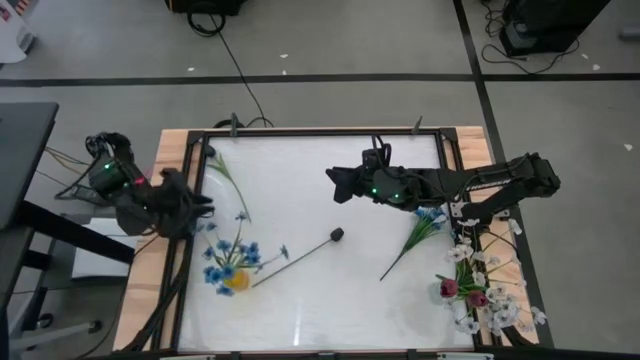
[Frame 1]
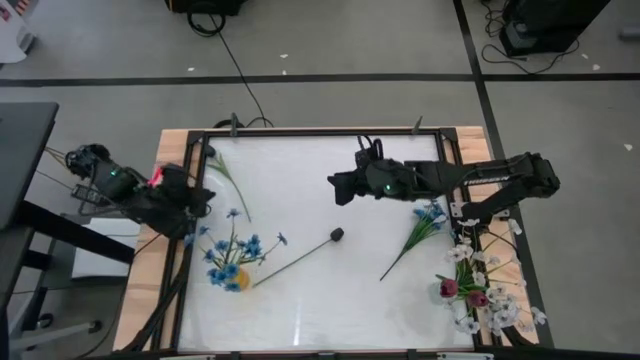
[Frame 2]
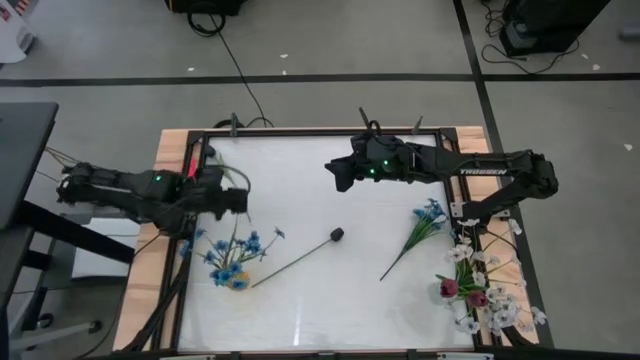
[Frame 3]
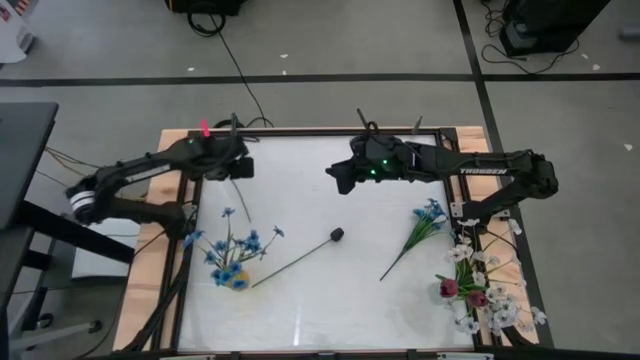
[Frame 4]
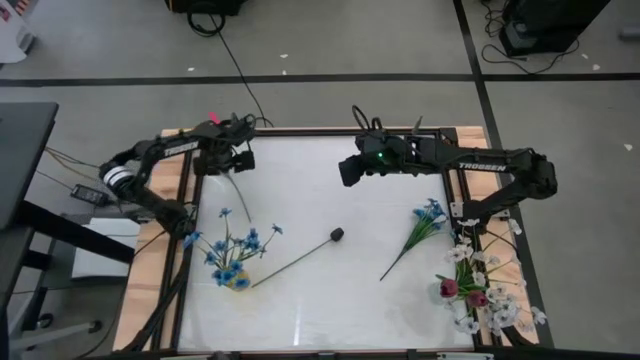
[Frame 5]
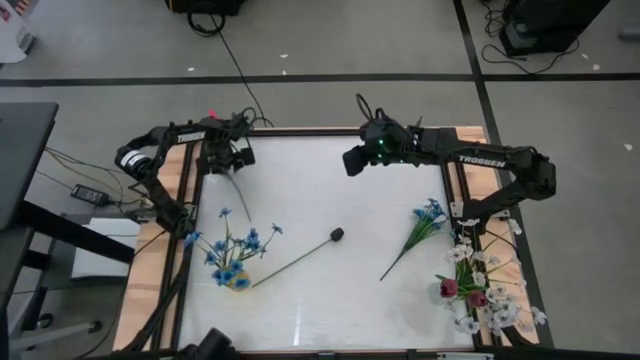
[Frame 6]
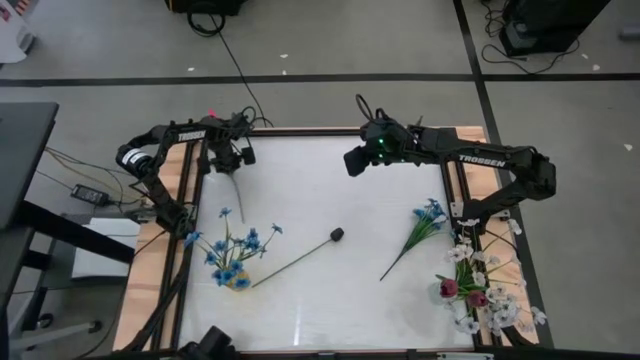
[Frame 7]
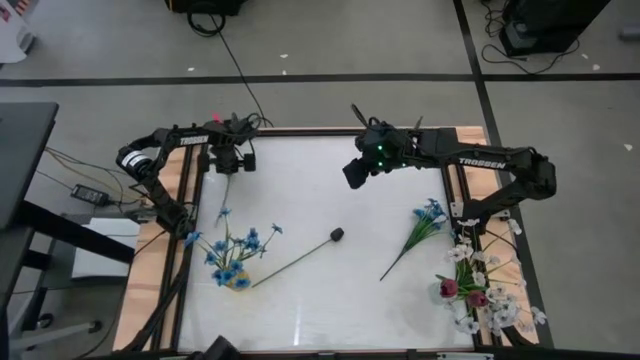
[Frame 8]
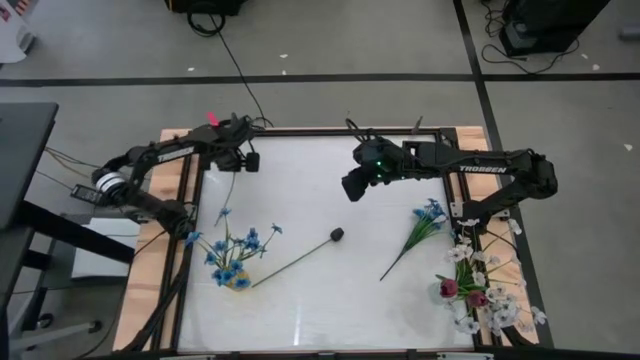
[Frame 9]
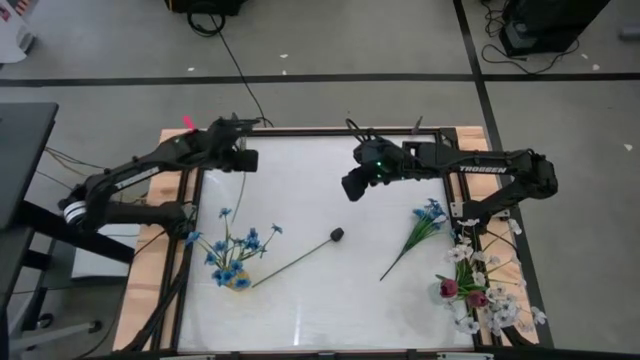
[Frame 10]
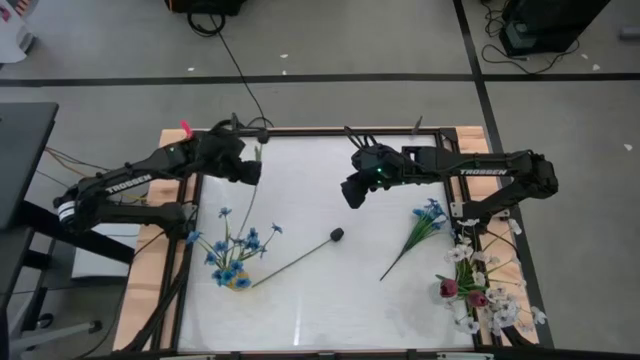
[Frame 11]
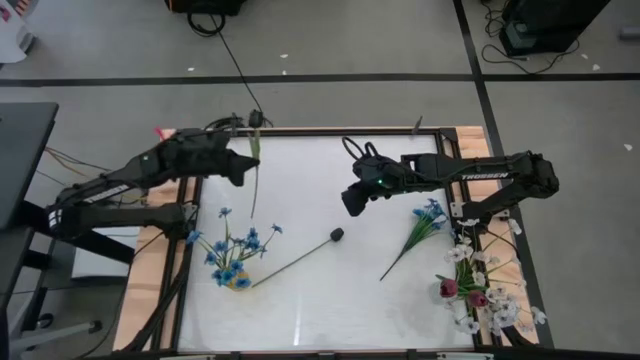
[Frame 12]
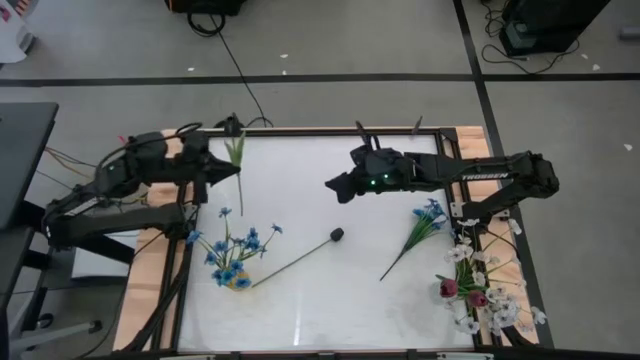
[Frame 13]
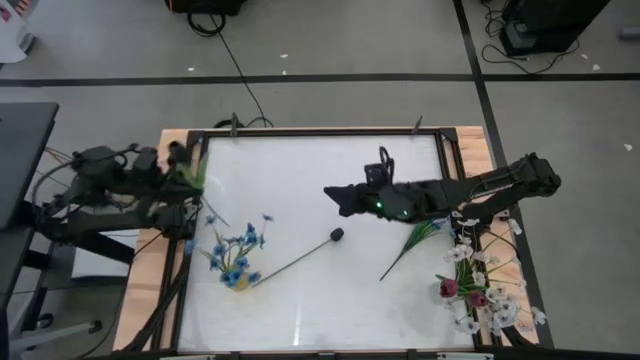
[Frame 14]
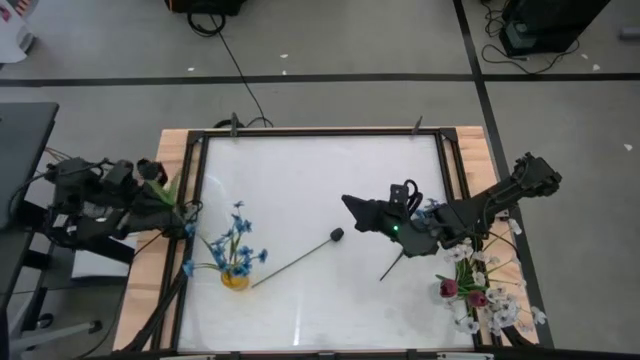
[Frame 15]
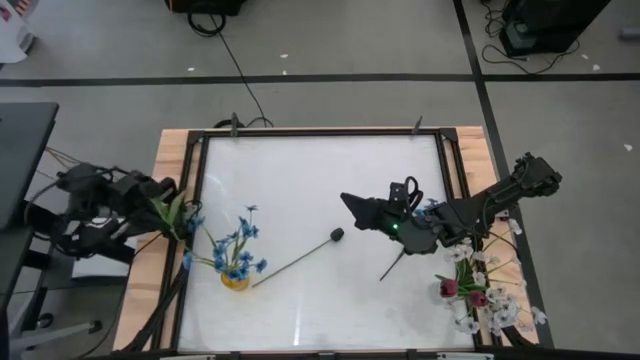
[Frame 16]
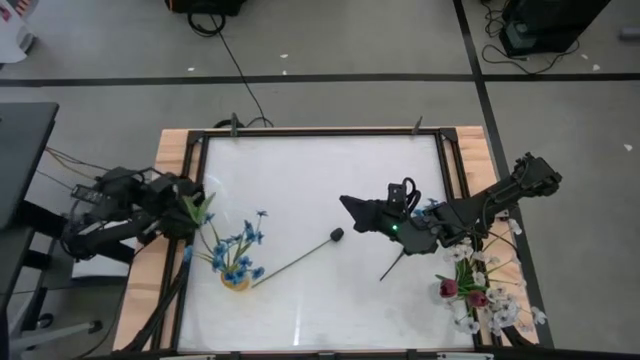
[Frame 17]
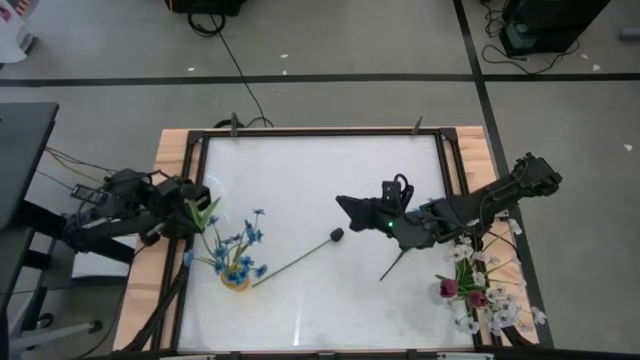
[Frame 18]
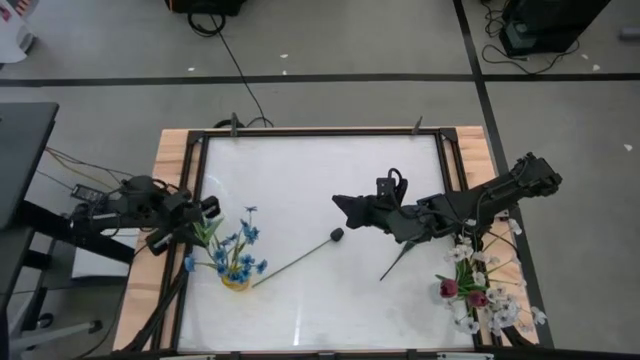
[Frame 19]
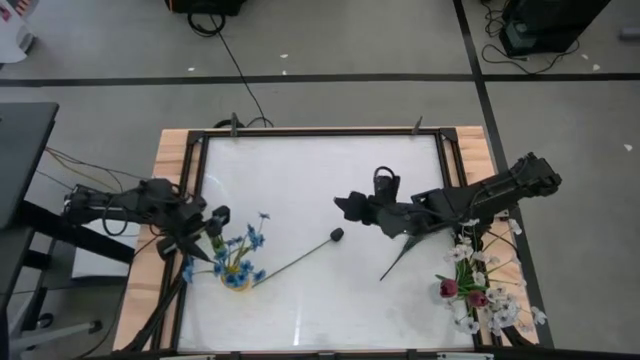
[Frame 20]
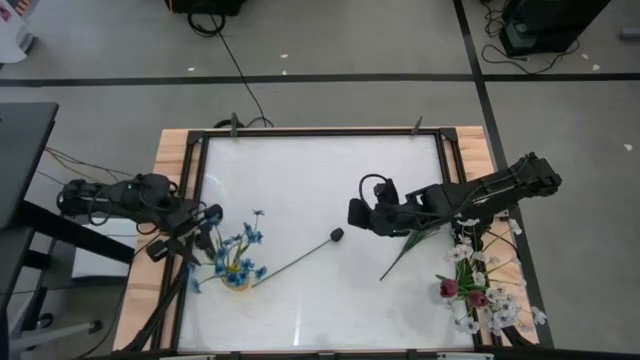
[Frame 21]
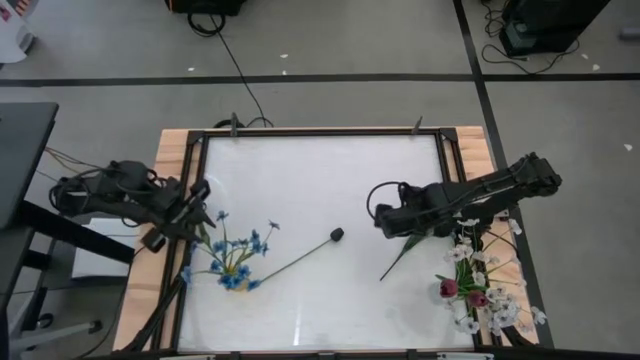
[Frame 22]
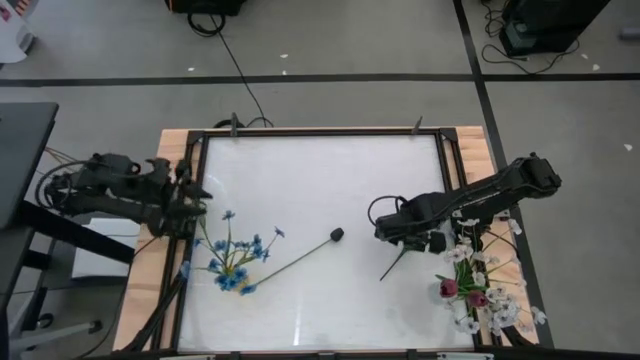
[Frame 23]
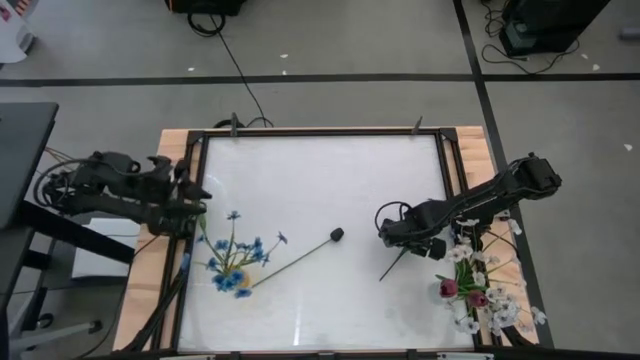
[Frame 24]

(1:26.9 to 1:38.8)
Task: Sort flowers into vase by color
Put the top black tulip into the yellow vase

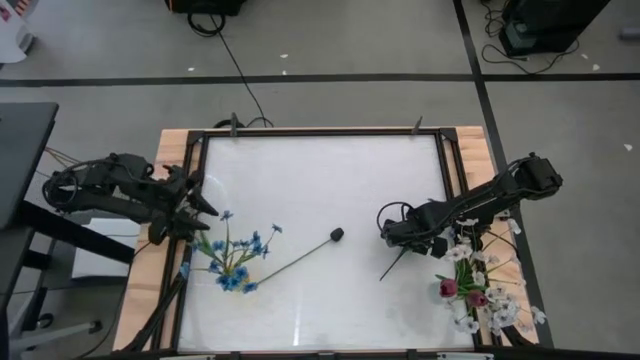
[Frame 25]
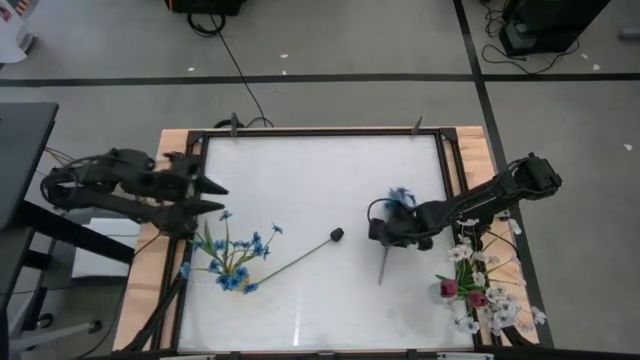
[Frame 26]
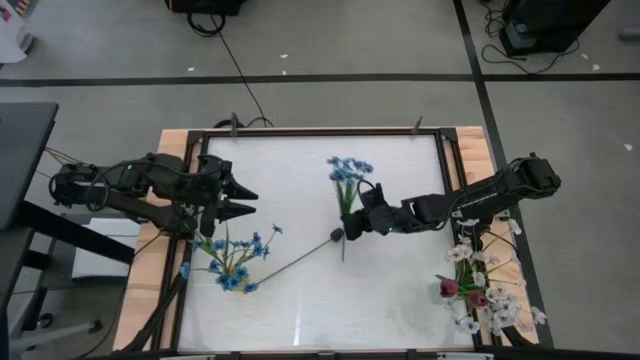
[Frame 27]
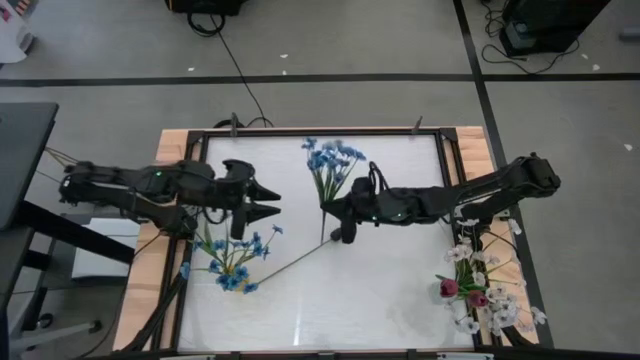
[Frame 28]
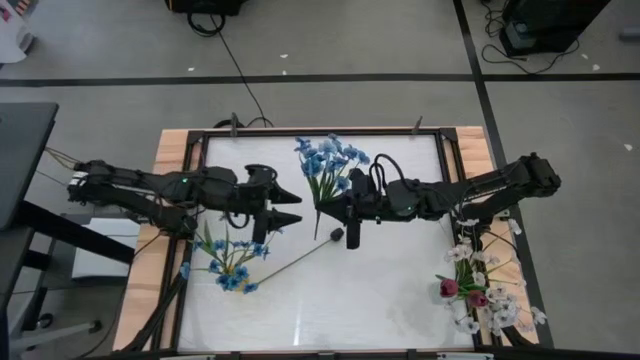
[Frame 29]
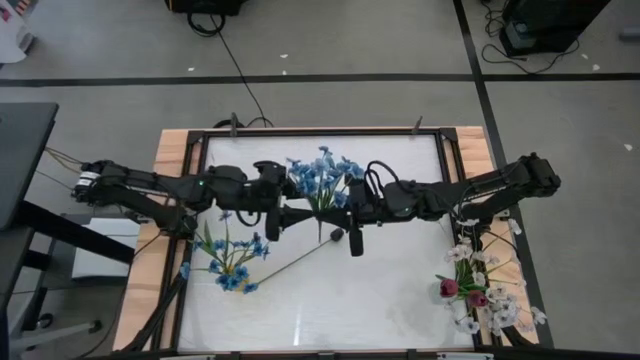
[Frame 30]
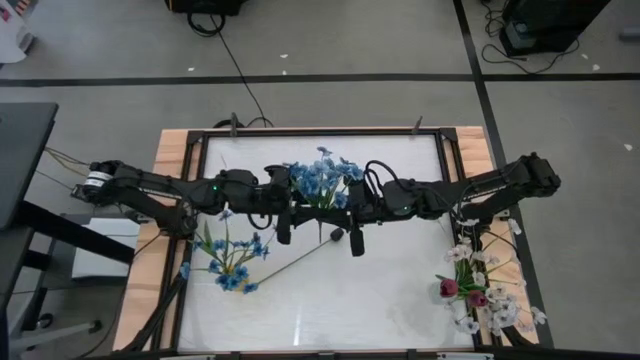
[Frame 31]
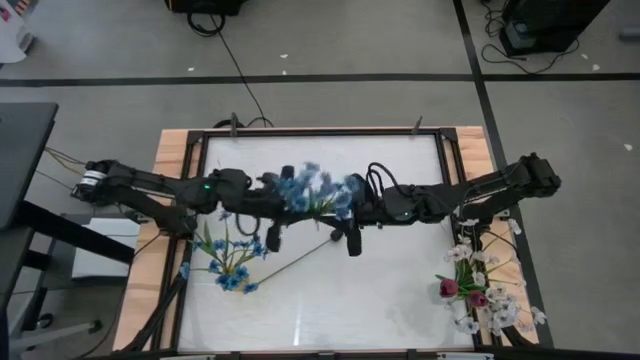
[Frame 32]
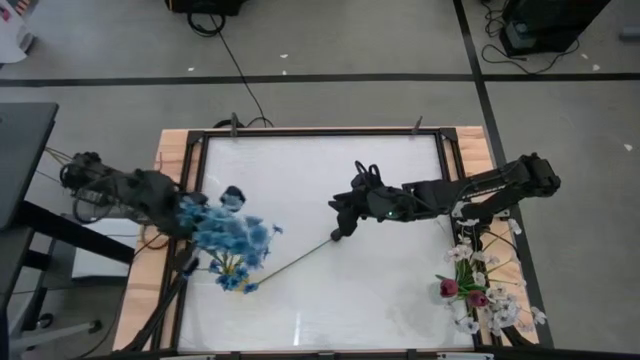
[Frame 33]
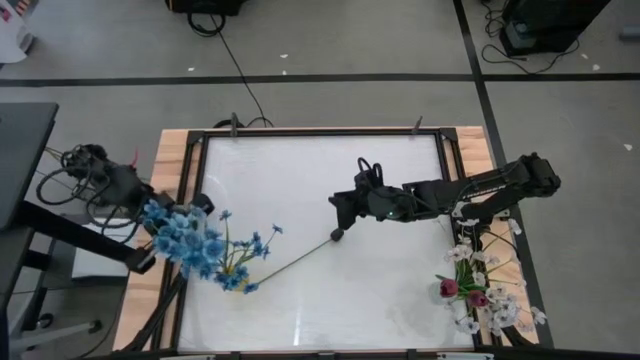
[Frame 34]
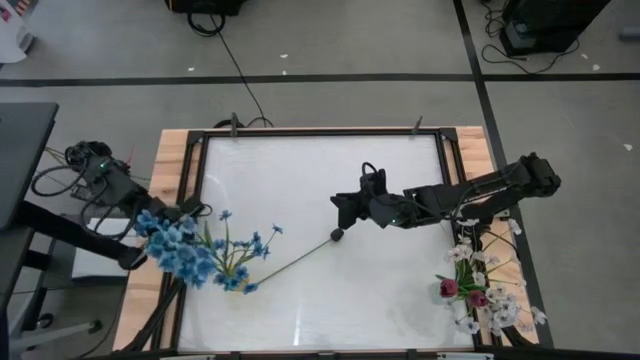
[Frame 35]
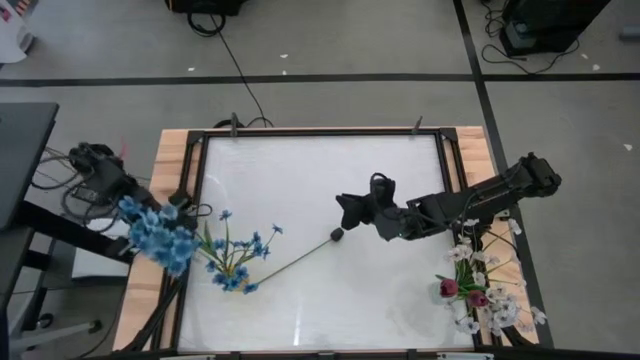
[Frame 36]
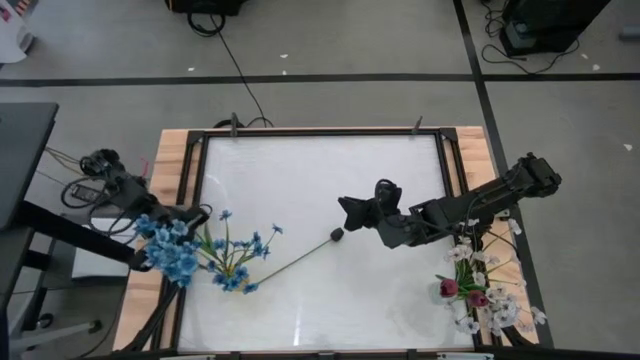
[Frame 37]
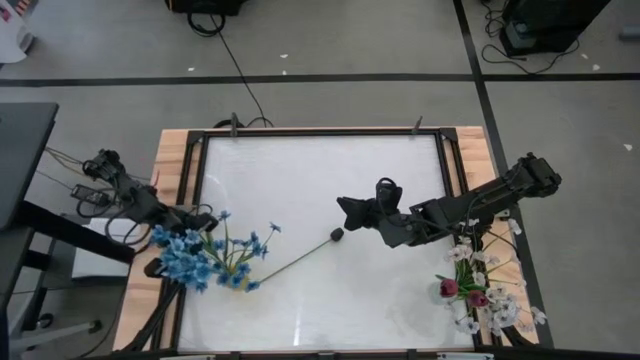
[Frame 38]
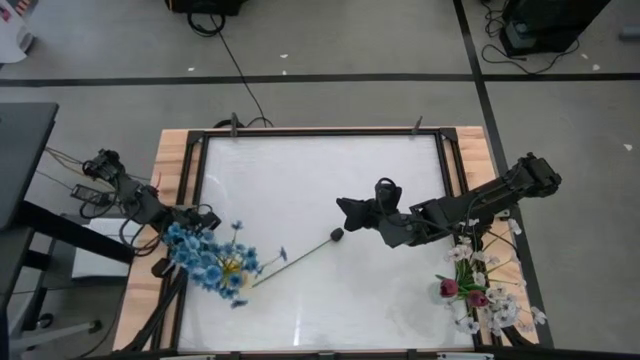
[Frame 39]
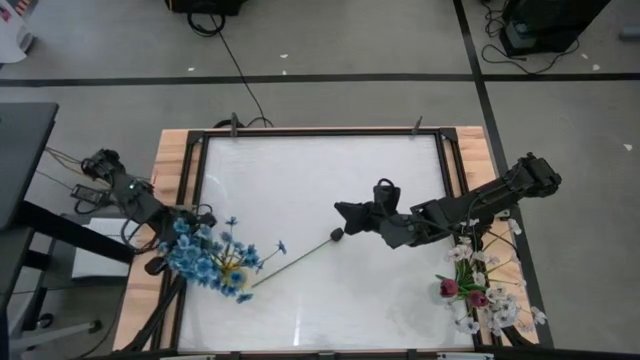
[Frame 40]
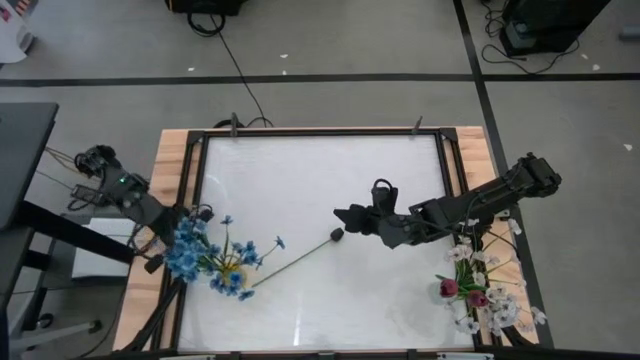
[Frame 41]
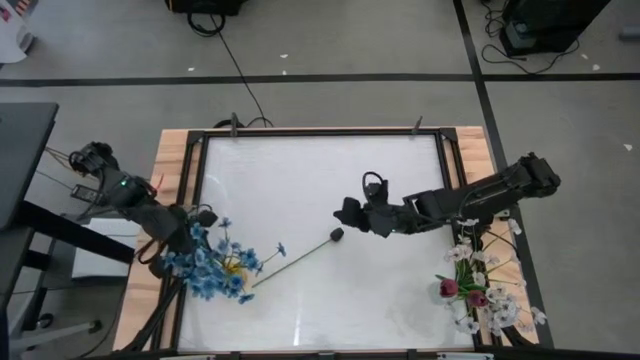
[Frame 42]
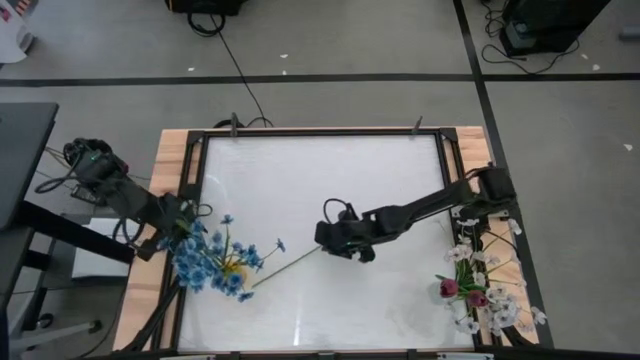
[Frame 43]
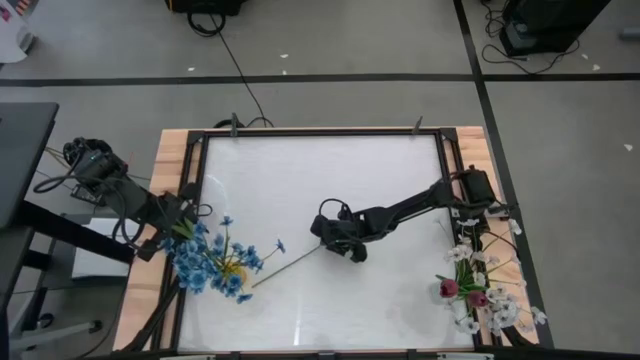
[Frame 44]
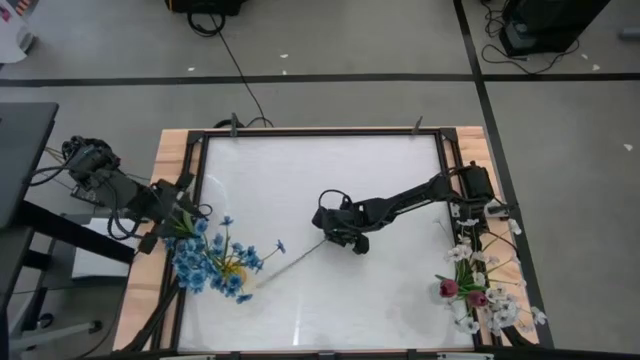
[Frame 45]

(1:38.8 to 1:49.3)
Put the blue flowers into the yellow vase
